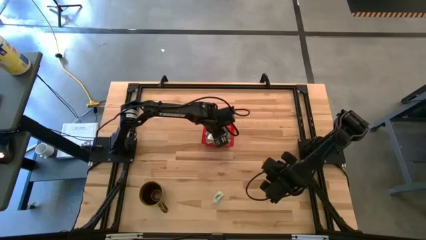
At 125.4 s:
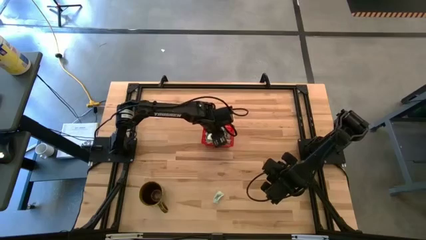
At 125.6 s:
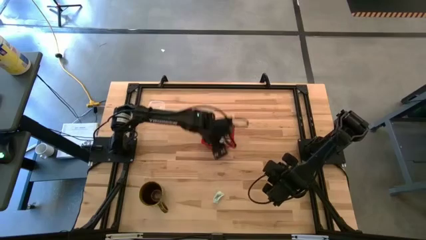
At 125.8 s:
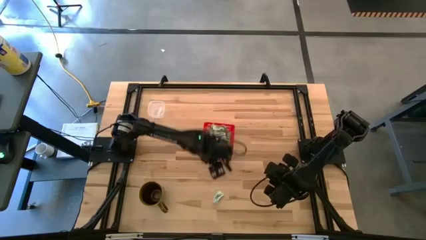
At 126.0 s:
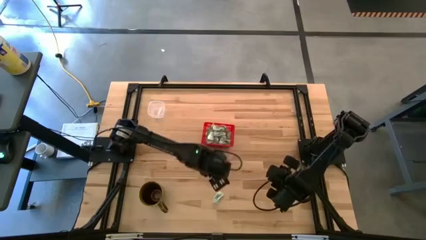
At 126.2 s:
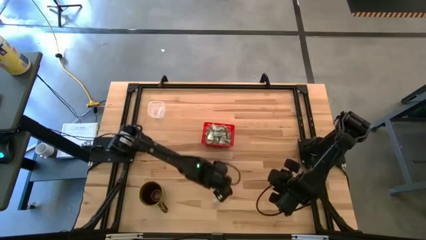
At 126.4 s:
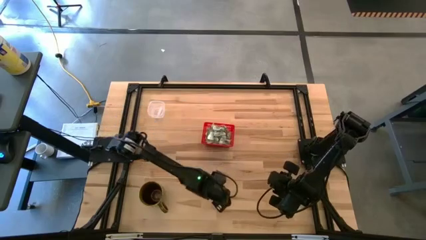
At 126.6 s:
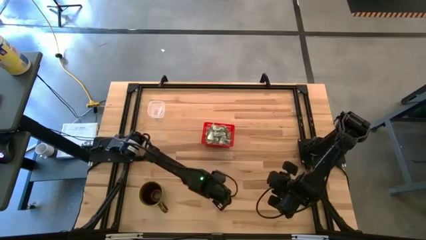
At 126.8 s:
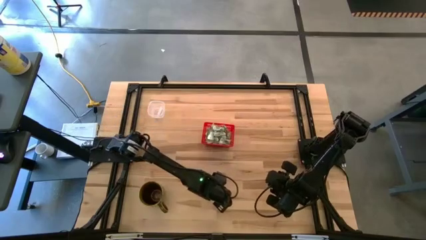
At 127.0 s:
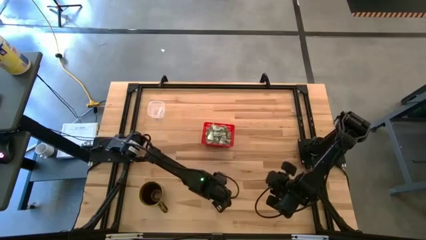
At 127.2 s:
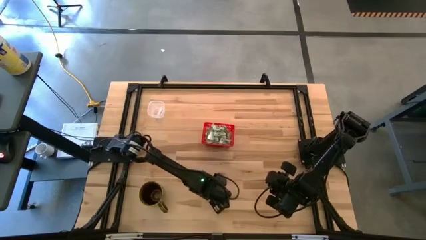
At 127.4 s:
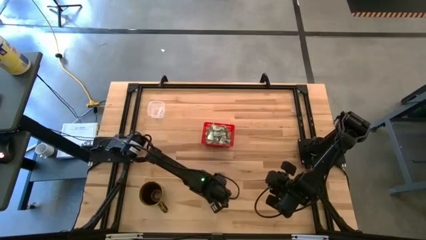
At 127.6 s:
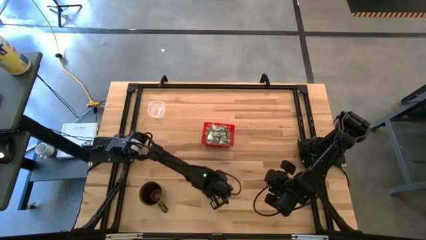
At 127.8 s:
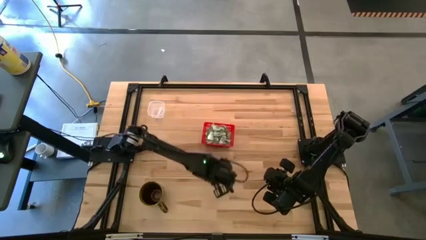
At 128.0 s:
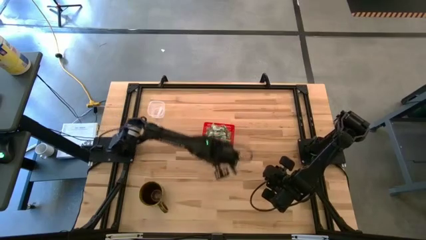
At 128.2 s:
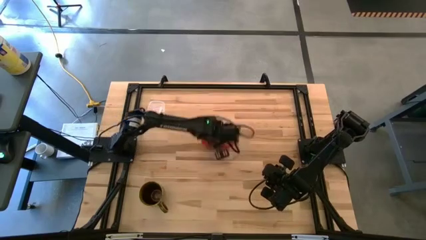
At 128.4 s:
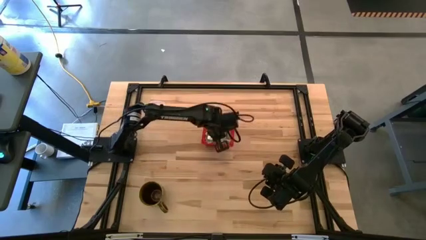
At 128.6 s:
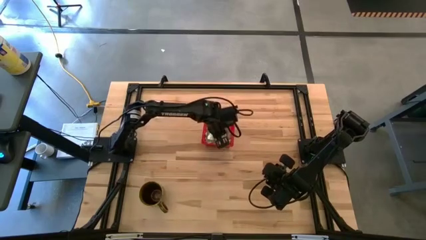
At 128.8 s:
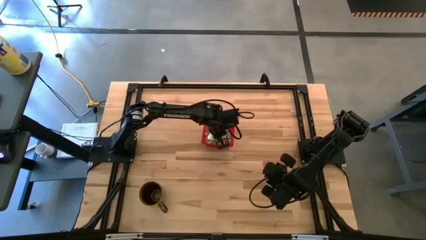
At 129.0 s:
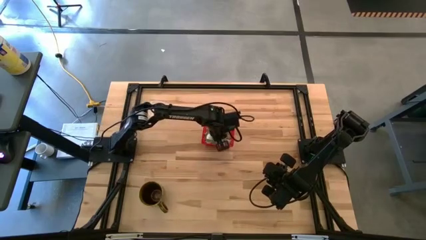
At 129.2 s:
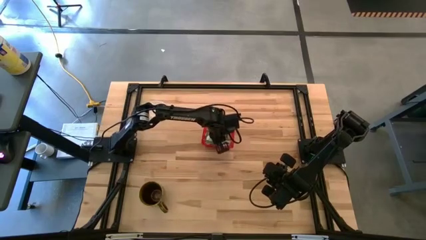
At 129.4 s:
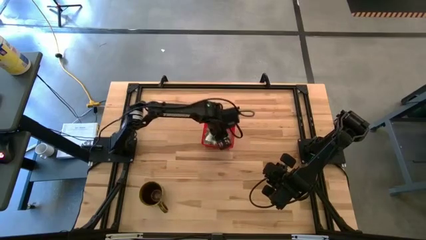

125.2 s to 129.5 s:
Task: Pick and place items into bin
Put the green stevia packet into the red bin

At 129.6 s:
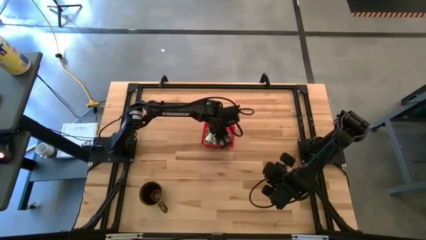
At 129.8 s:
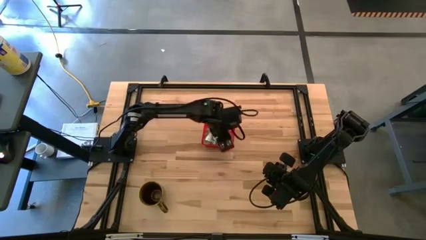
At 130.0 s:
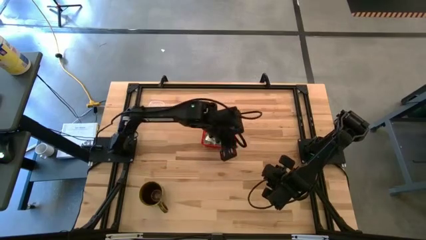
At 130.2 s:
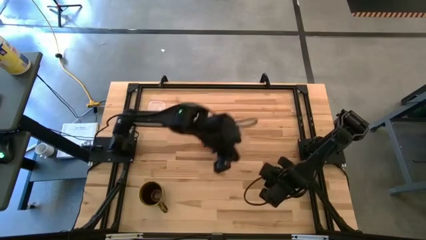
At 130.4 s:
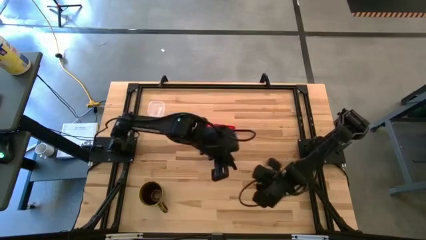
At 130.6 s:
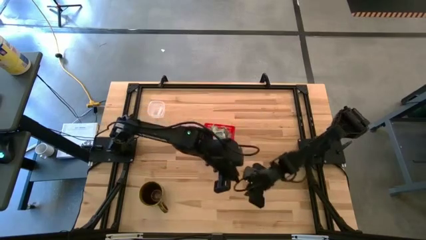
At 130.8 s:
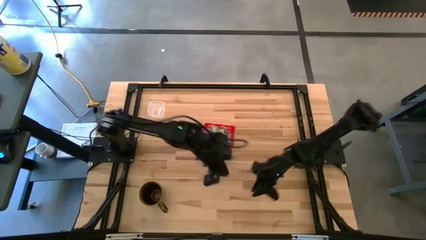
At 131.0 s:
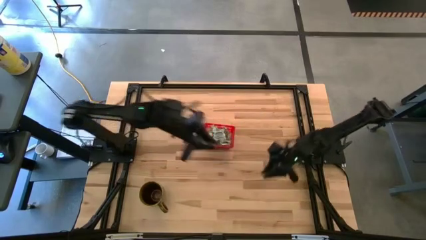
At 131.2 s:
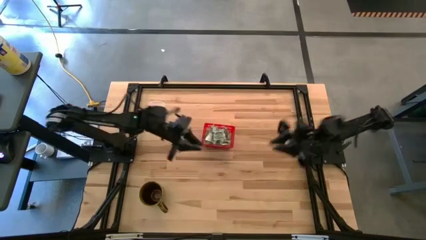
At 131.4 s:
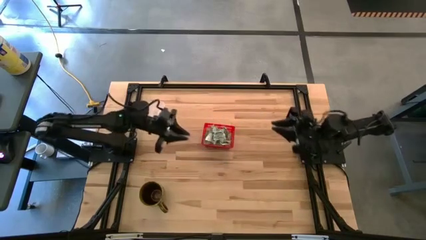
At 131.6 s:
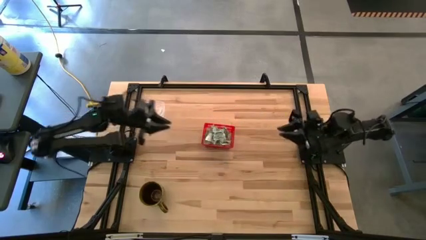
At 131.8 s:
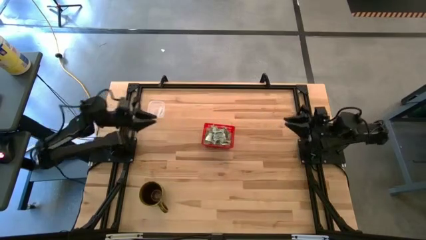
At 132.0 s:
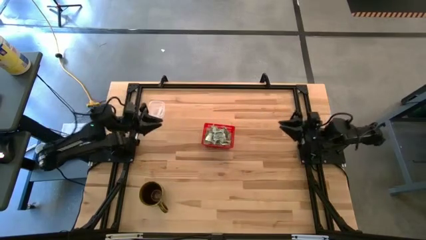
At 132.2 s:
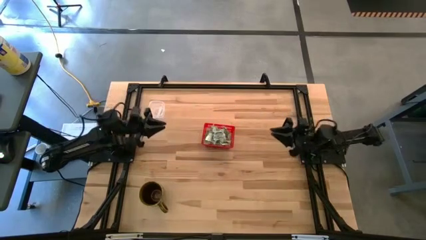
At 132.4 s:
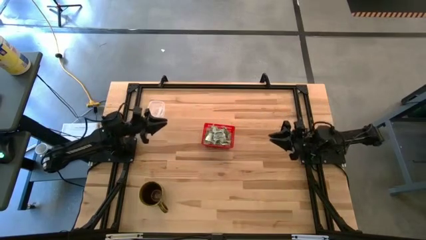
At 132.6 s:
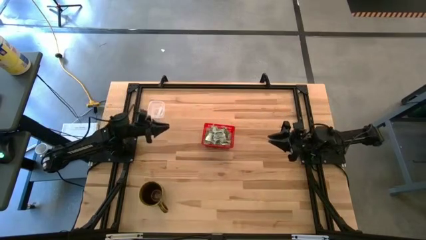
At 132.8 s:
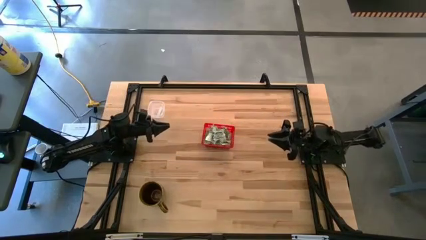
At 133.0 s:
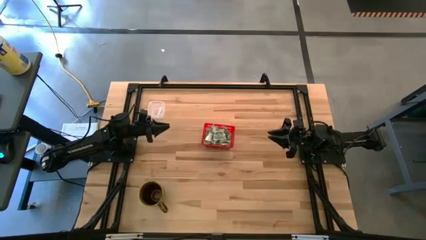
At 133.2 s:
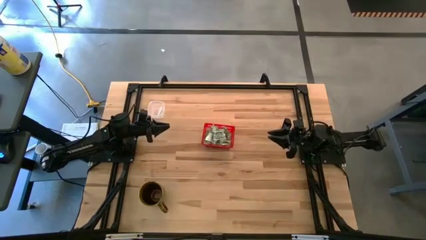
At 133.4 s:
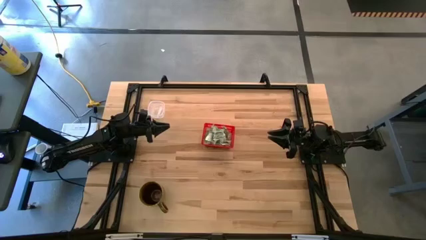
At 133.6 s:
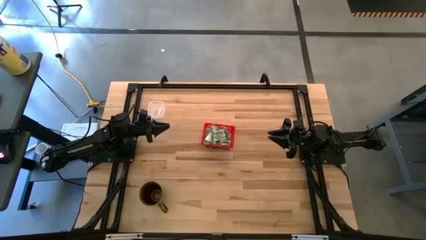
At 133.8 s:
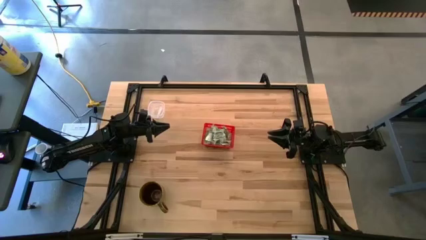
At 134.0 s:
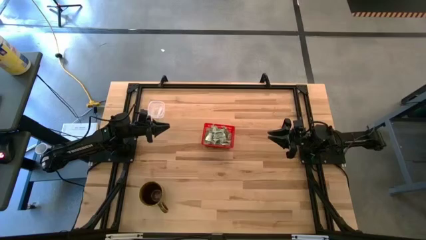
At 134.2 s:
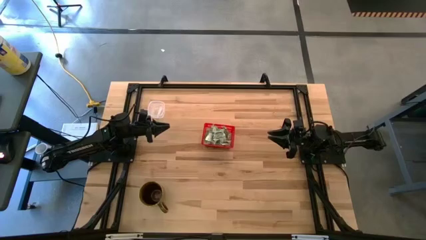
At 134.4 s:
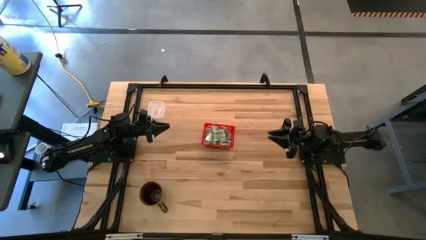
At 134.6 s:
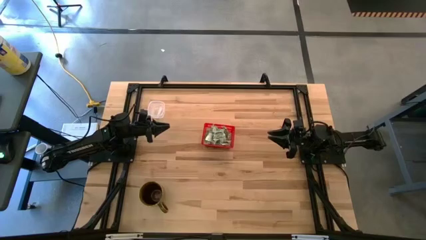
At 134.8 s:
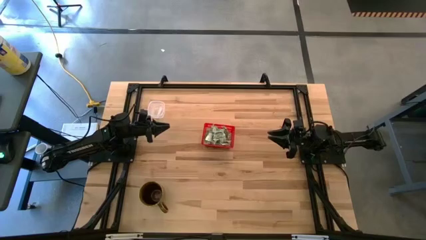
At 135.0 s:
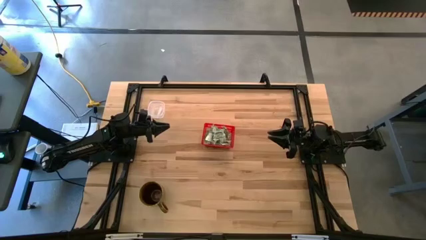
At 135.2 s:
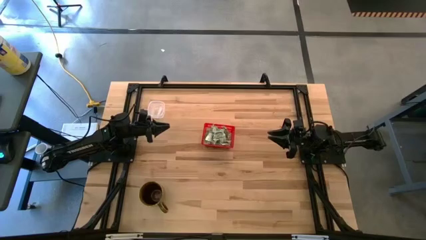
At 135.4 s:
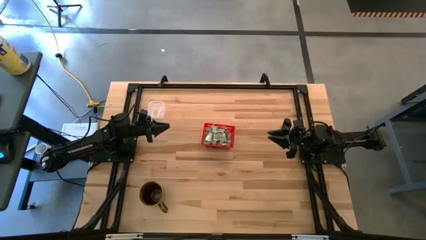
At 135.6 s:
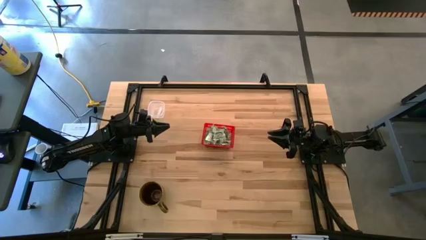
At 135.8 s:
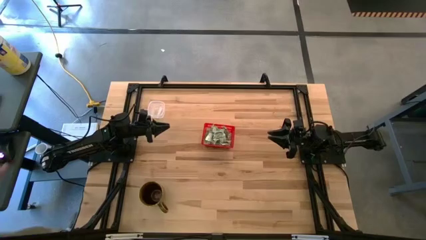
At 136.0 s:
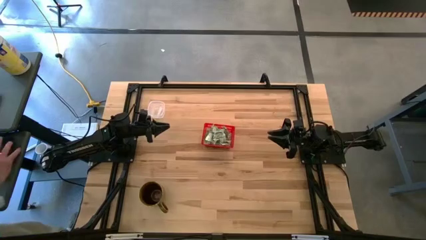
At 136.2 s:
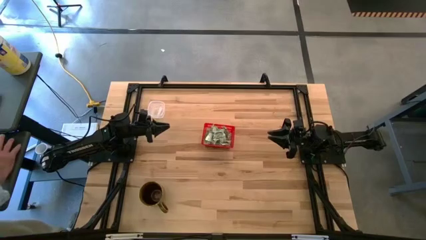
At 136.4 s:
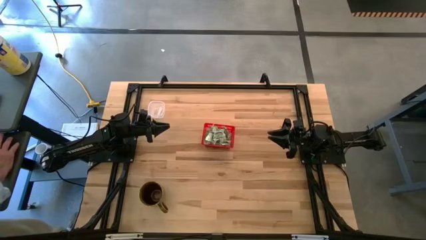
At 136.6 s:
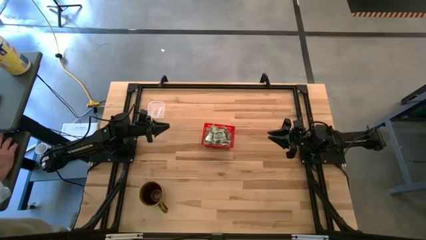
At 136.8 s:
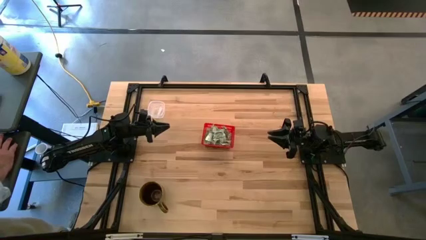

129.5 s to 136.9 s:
Return to Home Position
